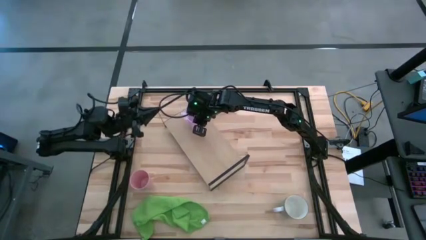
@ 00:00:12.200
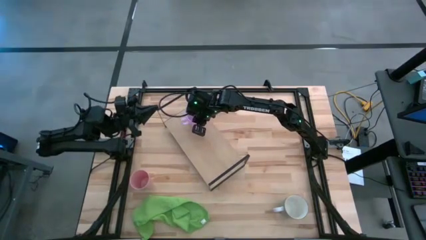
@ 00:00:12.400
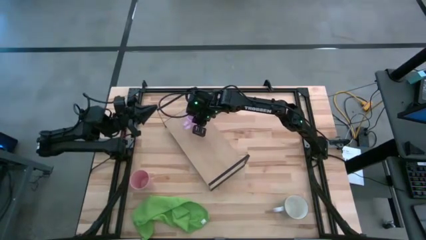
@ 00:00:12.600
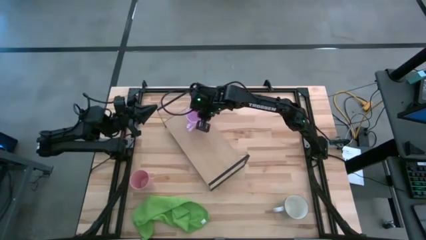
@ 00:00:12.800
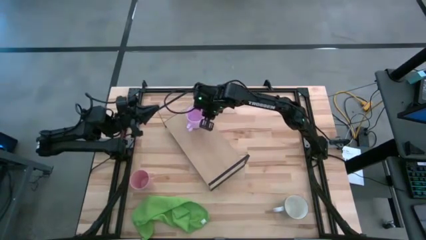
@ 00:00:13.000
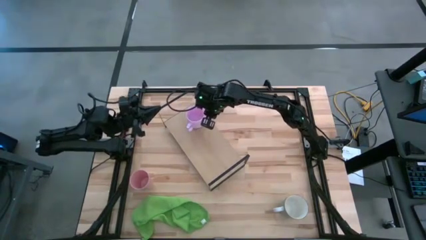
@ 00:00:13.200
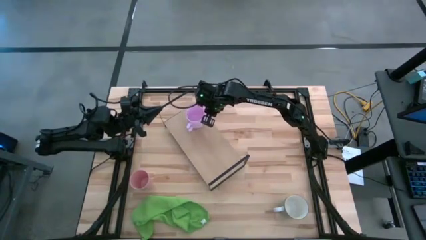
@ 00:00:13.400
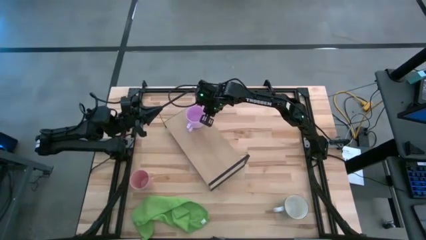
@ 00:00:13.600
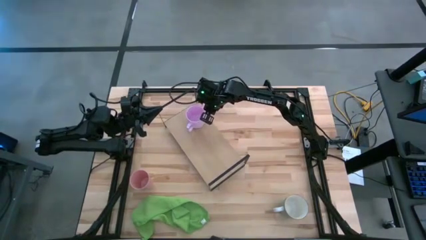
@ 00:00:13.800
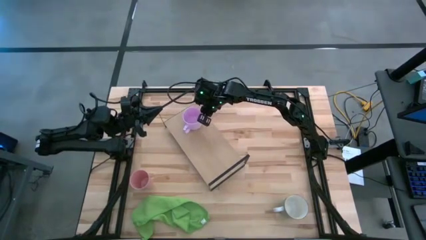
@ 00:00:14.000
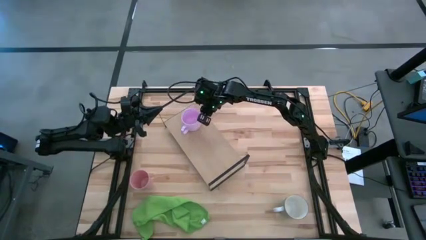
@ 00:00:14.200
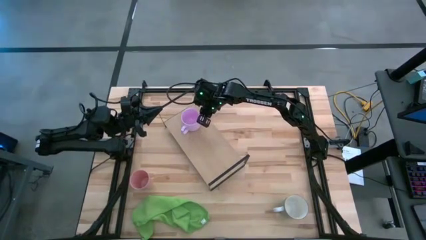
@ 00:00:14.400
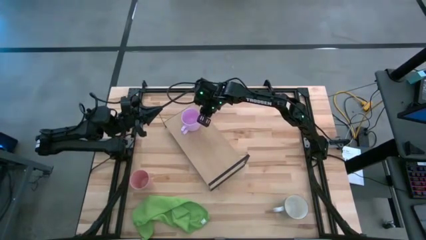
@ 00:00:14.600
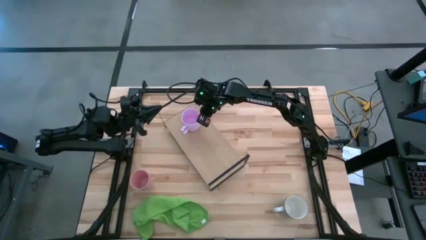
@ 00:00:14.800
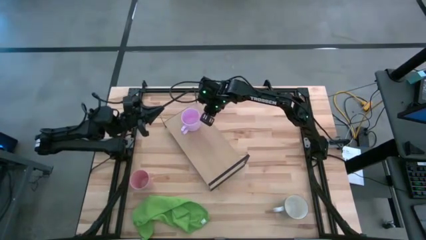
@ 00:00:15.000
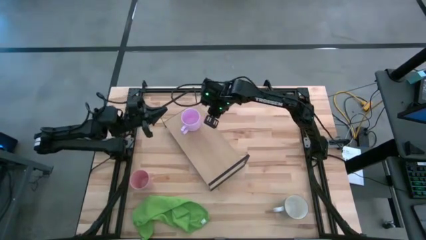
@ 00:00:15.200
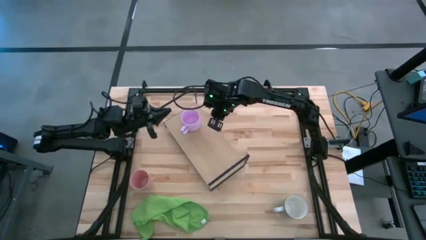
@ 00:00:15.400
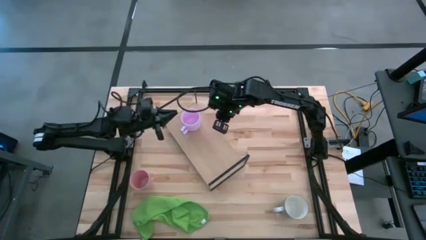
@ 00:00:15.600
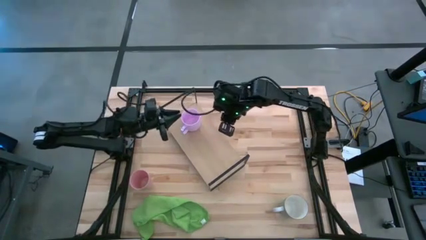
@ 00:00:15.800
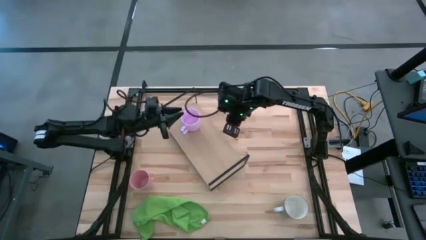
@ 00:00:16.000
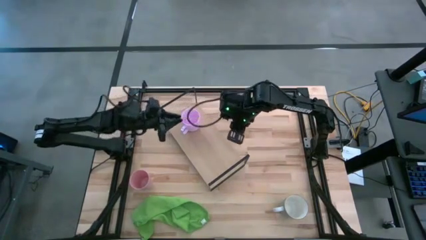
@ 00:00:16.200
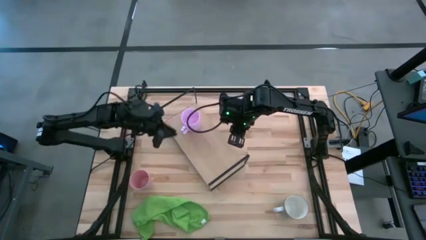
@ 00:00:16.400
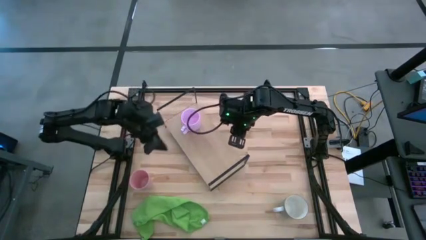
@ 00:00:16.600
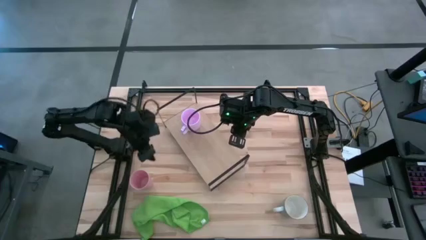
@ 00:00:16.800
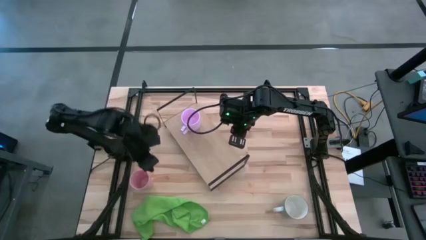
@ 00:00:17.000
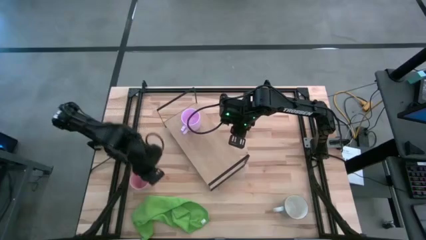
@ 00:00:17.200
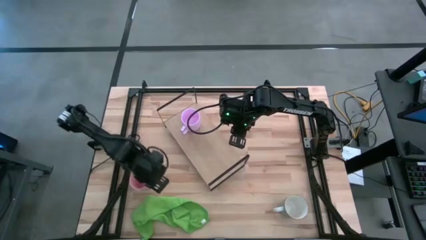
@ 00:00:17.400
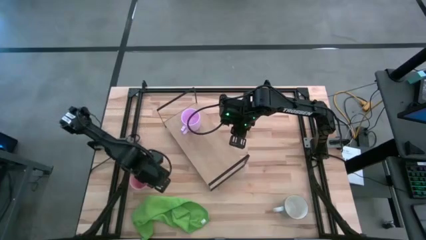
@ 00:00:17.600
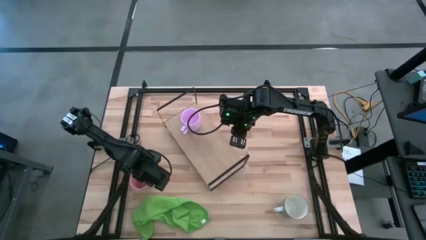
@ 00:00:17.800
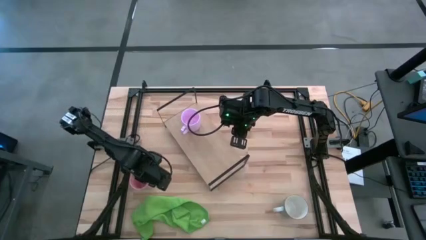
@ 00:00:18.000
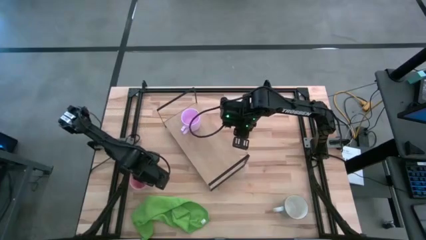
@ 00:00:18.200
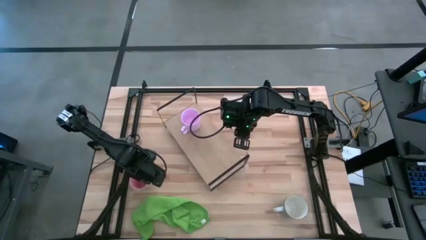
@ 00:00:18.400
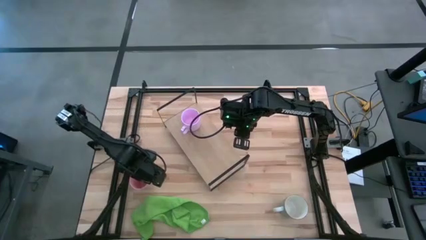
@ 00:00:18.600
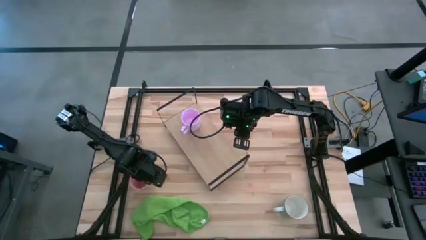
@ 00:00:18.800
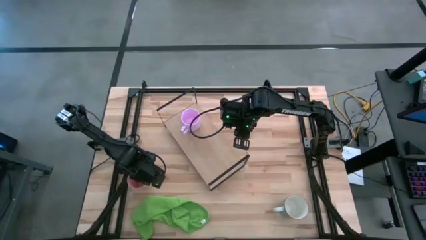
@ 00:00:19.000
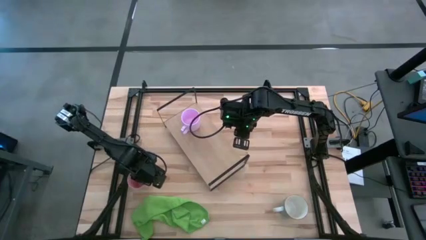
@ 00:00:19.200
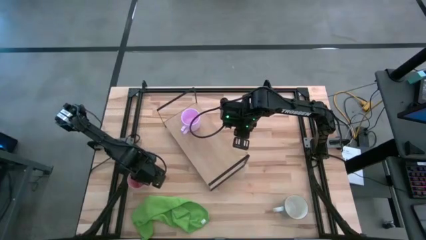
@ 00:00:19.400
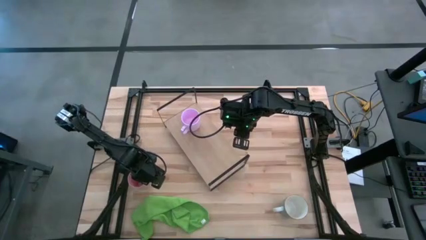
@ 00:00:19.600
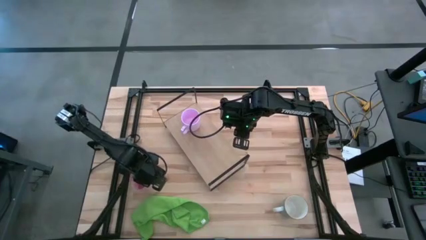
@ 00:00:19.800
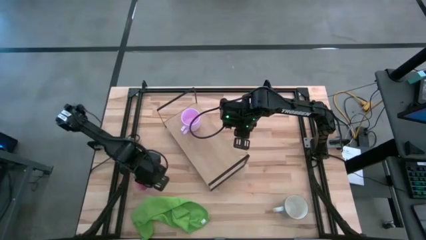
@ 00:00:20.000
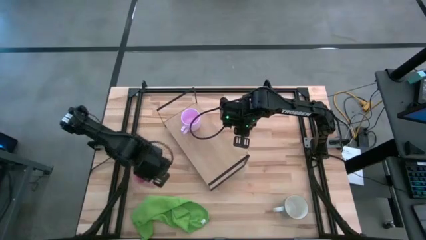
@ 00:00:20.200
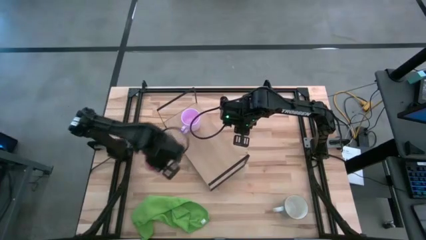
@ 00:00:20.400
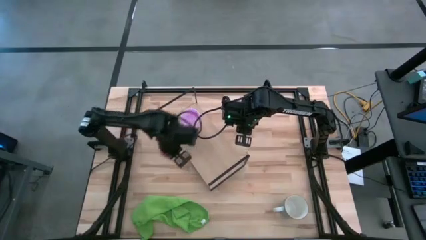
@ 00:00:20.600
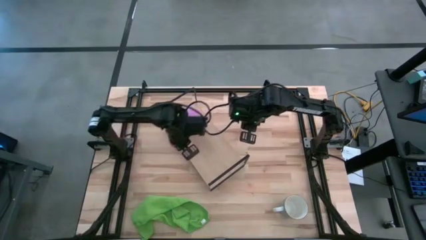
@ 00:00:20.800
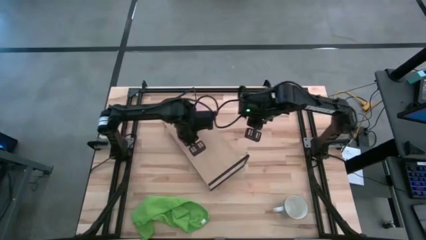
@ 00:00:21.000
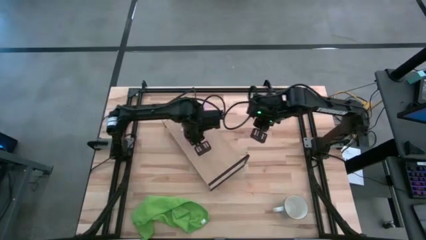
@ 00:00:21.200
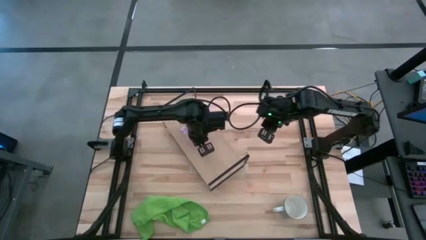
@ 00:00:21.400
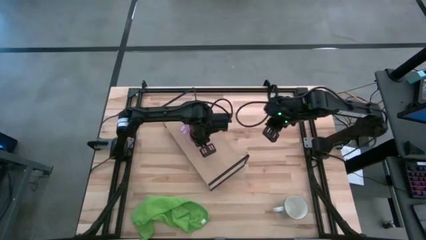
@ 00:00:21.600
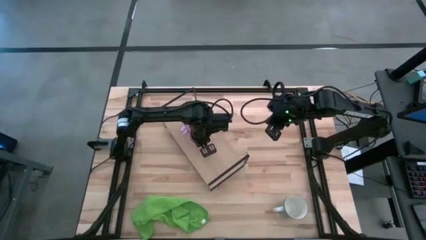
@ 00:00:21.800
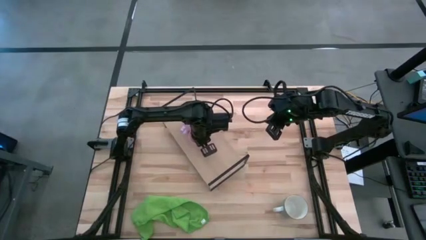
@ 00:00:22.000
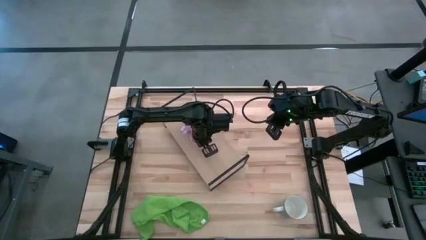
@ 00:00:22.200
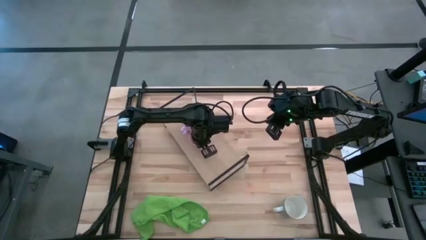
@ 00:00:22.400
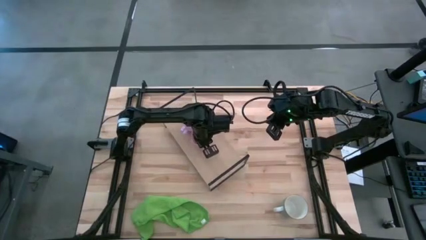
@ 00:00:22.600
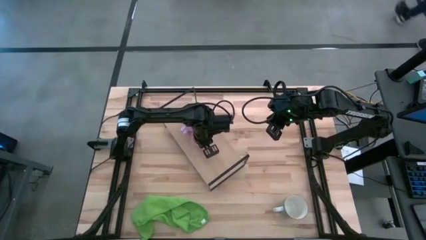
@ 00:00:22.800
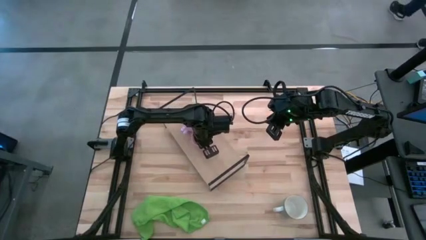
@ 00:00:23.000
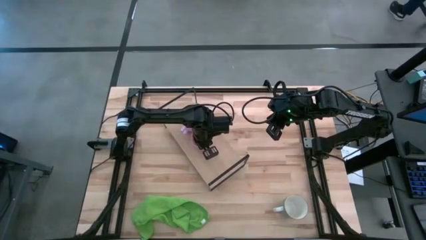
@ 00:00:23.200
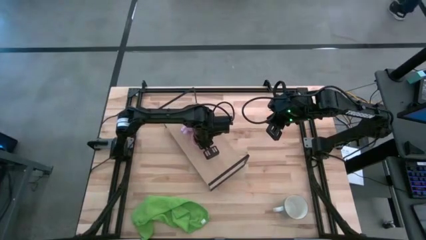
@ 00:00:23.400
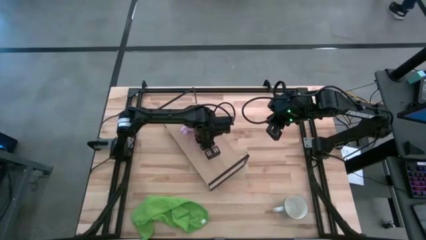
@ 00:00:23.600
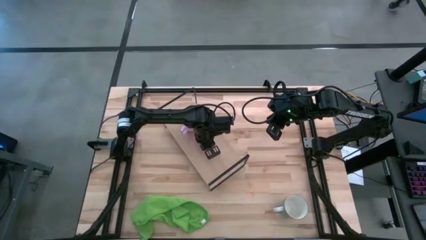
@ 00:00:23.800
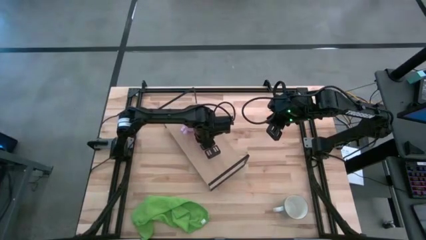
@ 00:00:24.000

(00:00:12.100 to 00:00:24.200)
Task: Stack small to large cups/mugs on shelf
Put the light pink cup on the shelf
